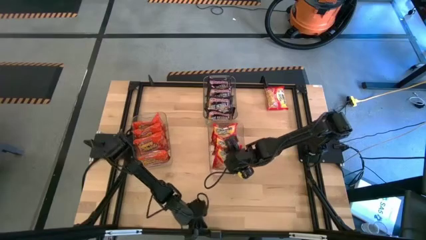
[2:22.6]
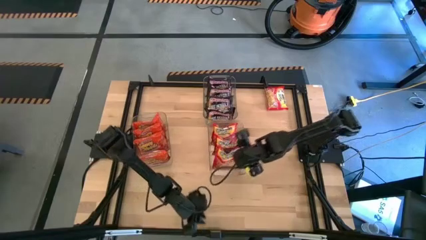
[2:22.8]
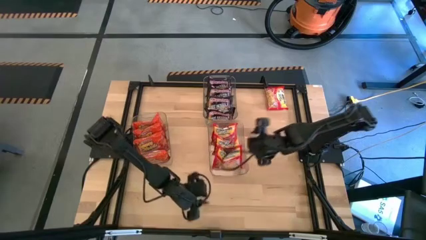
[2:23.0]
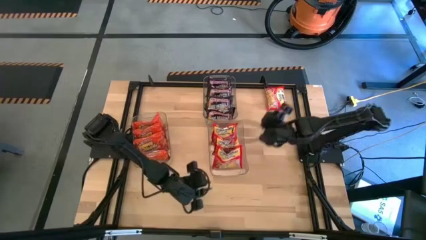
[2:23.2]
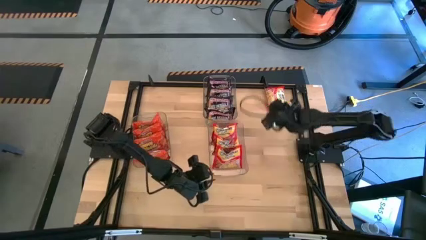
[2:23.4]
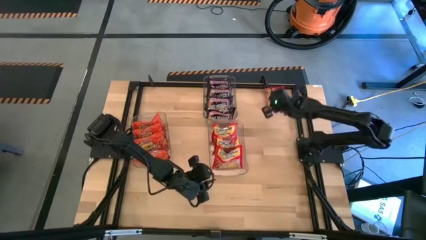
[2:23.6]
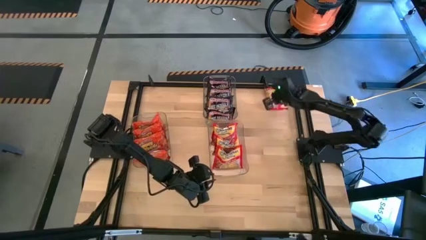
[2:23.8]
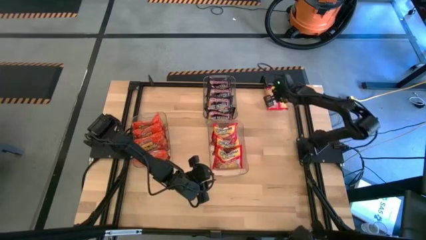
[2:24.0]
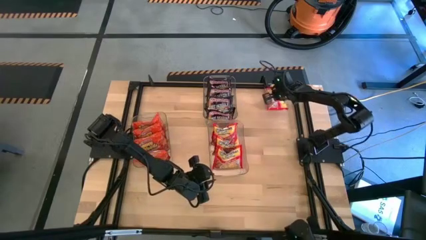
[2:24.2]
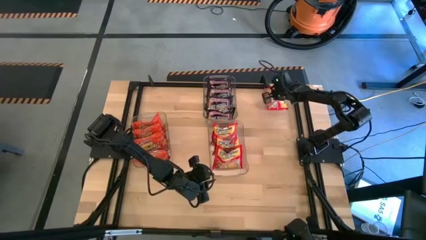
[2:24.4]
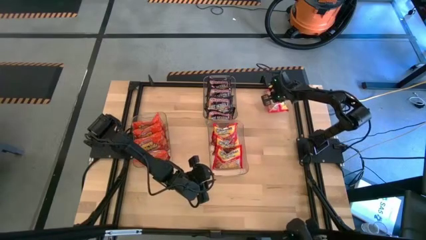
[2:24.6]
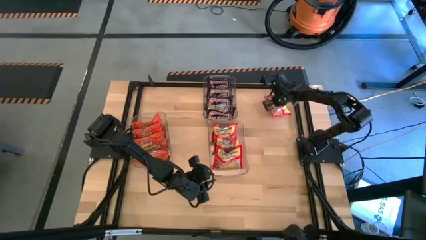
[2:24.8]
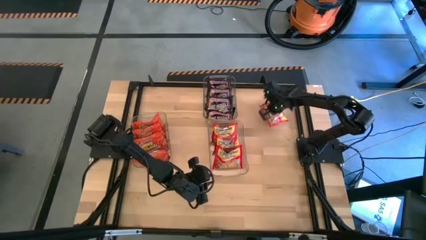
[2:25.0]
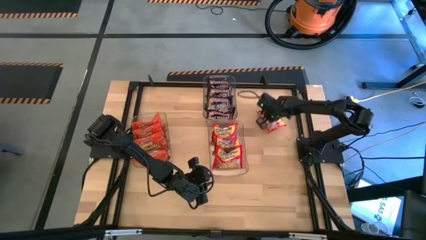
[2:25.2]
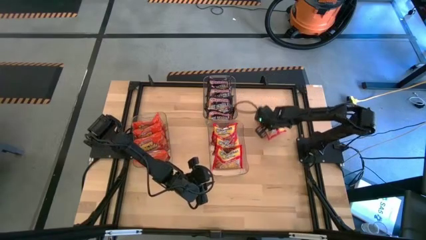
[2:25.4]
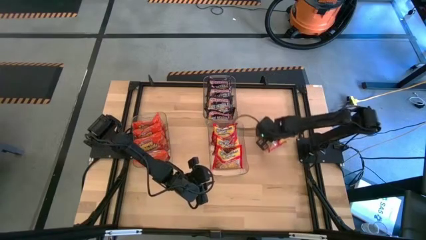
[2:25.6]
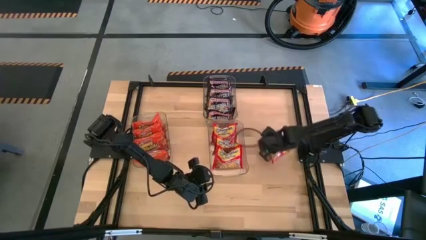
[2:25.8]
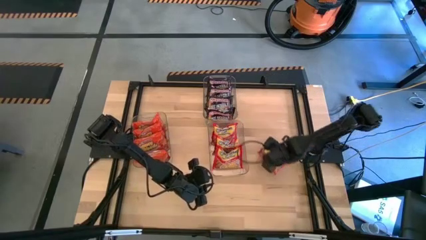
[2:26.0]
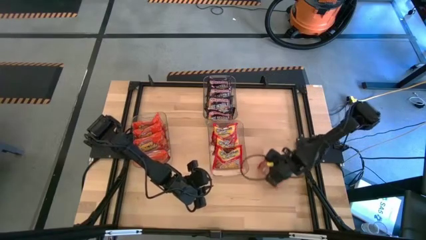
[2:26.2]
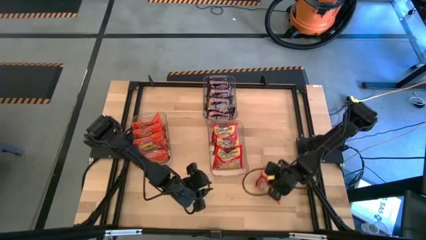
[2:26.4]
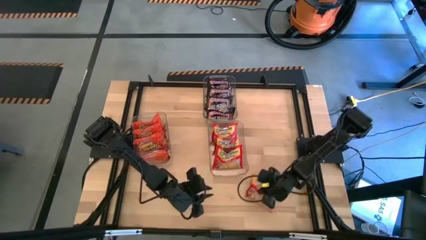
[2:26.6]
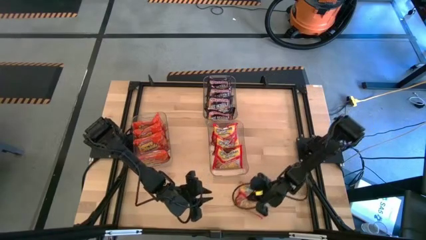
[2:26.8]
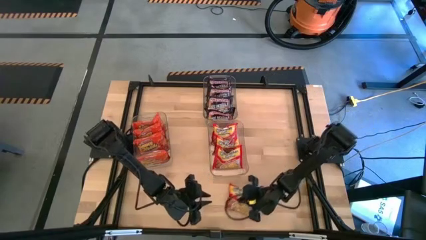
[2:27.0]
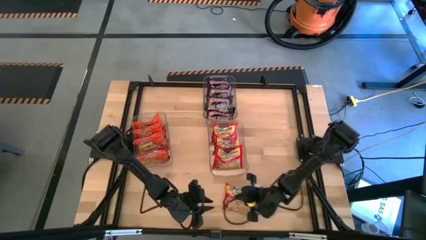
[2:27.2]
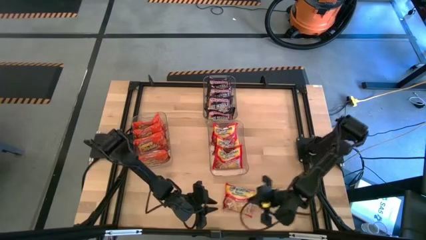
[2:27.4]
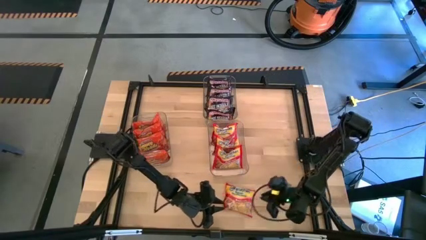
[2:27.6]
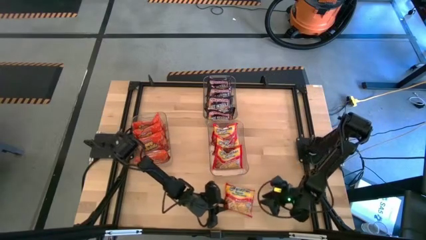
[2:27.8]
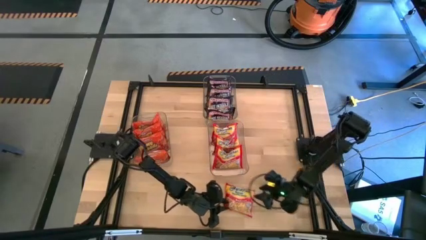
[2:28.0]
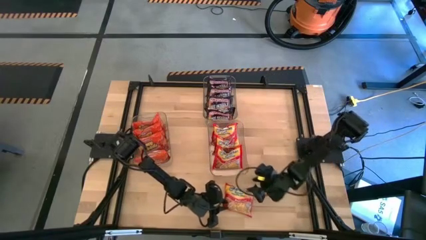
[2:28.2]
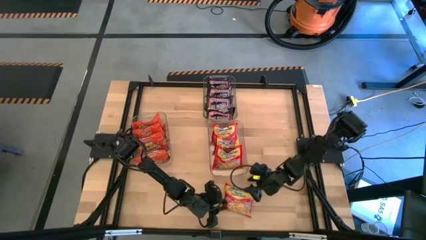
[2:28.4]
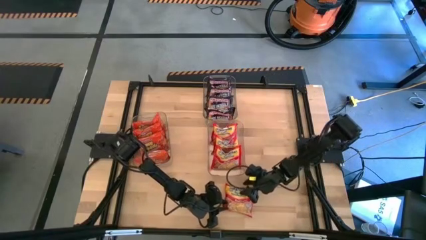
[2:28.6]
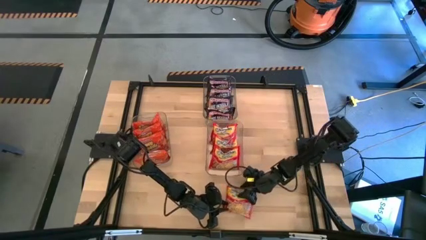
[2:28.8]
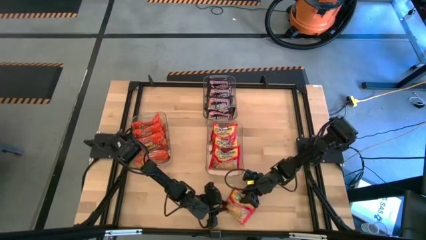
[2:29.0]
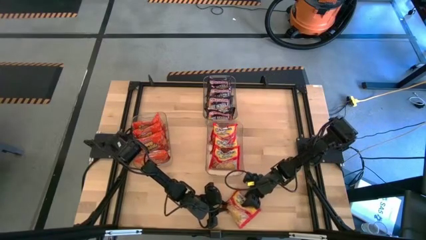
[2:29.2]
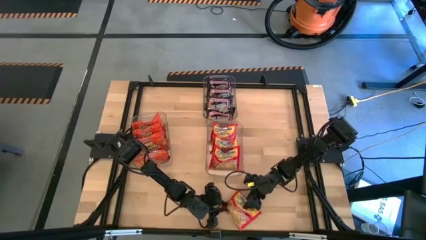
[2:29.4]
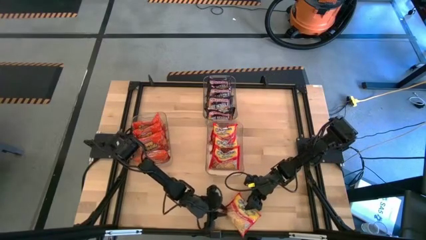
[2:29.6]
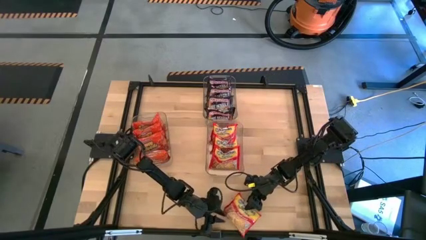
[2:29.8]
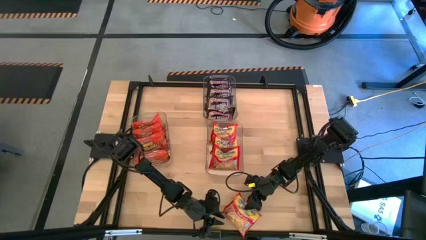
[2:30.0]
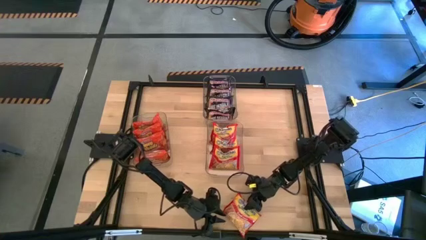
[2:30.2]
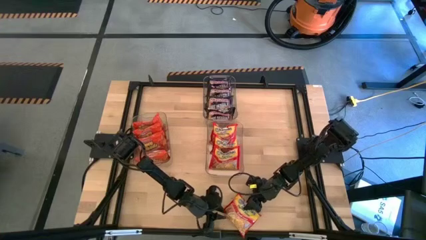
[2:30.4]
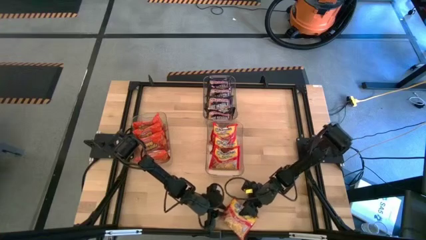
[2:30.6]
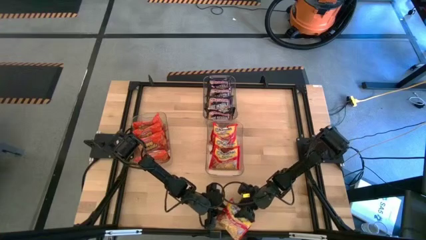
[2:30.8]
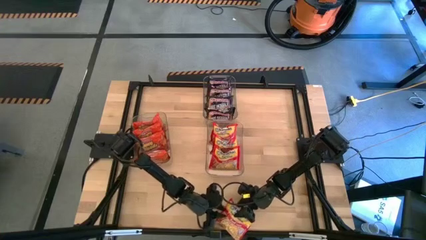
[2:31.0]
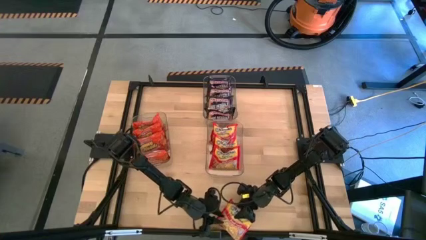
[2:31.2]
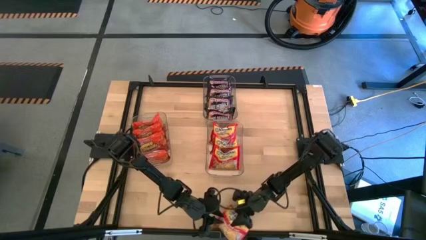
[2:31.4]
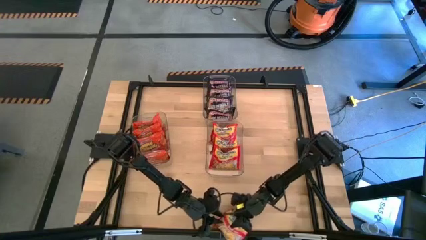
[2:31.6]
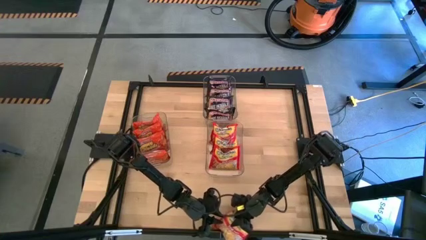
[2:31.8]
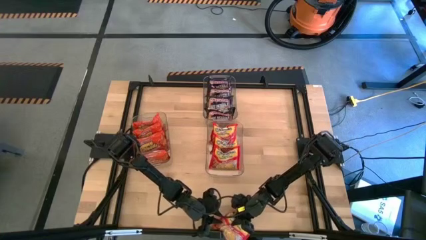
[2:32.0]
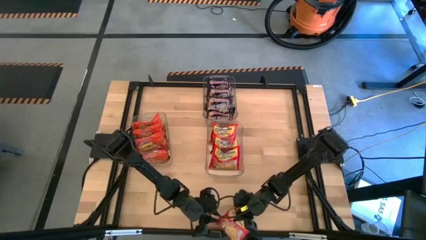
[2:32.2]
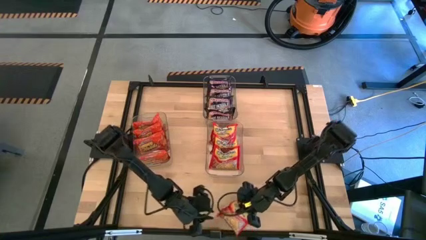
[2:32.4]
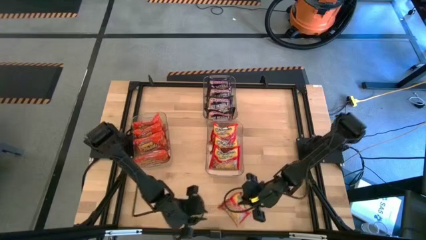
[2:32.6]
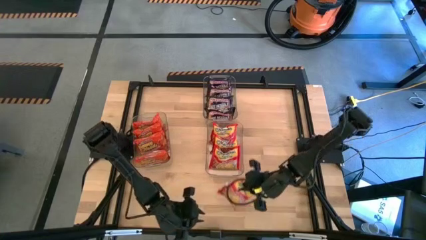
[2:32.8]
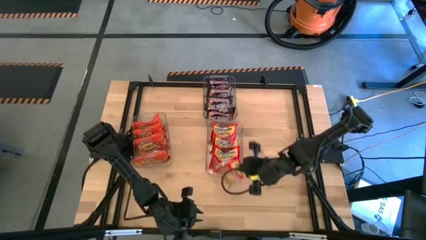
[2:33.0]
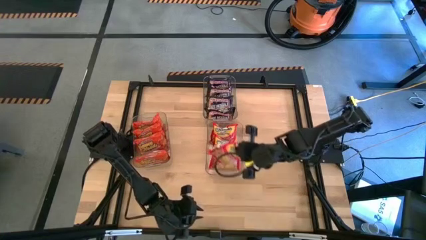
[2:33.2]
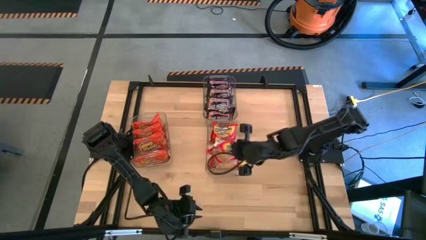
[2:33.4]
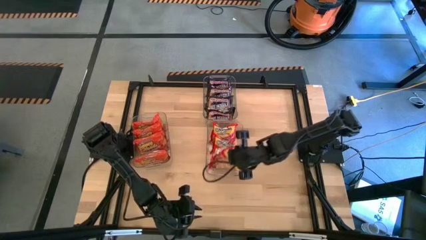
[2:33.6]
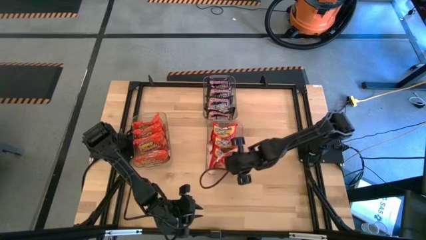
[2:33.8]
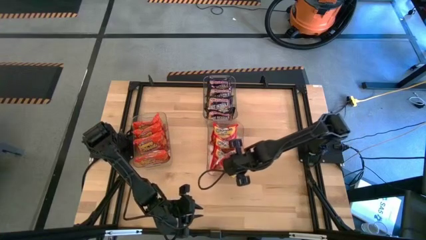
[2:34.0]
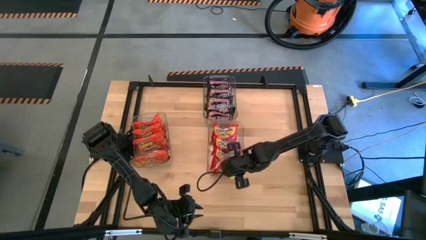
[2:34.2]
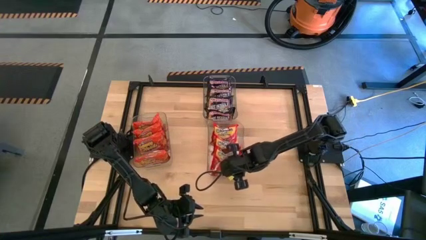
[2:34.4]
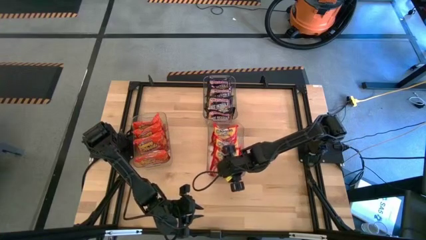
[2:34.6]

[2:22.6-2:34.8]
Task: Sort Maruchan noodles
Put the red noodle pack into the right transparent bin

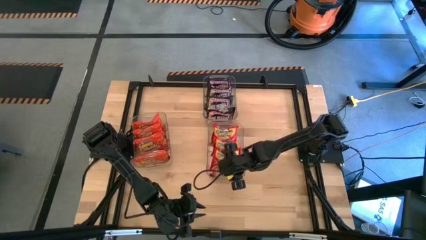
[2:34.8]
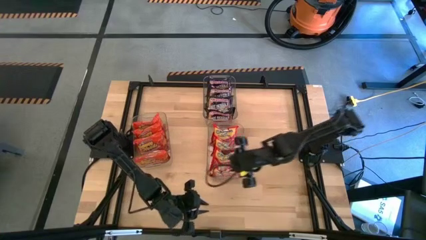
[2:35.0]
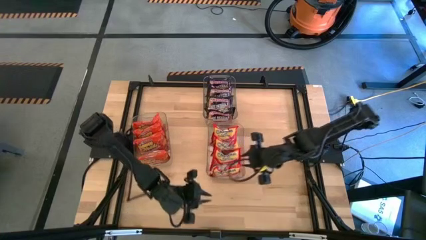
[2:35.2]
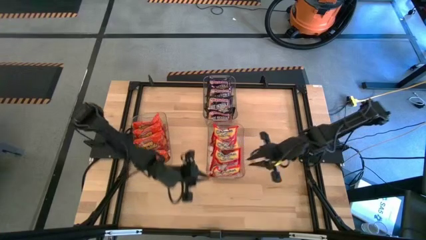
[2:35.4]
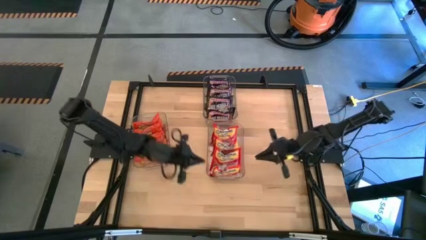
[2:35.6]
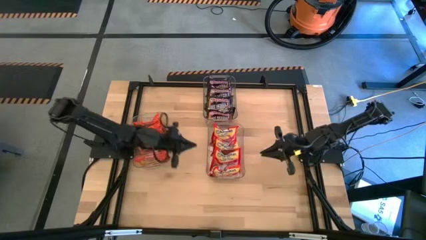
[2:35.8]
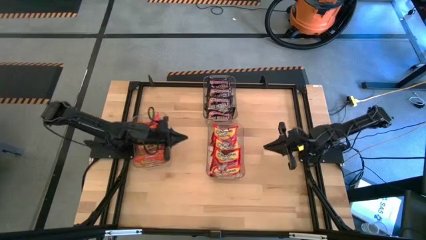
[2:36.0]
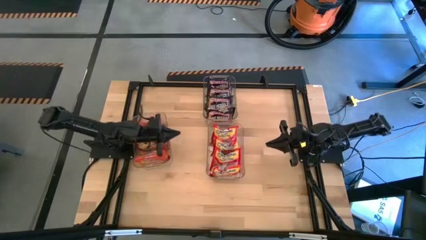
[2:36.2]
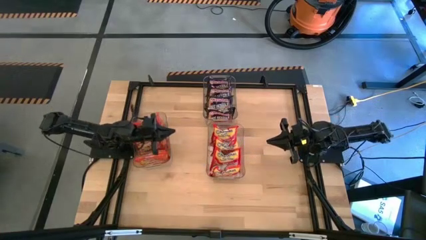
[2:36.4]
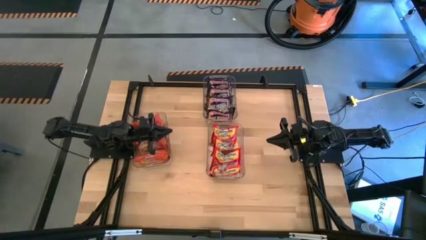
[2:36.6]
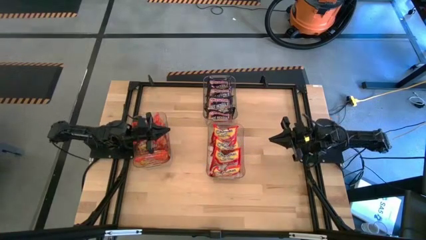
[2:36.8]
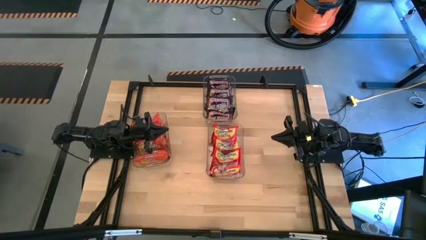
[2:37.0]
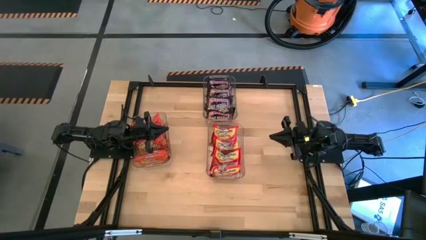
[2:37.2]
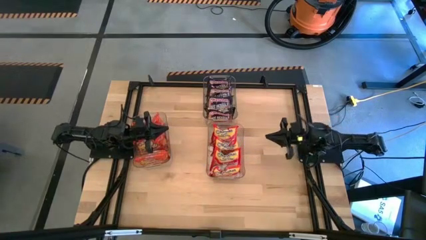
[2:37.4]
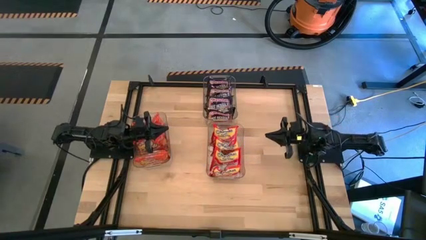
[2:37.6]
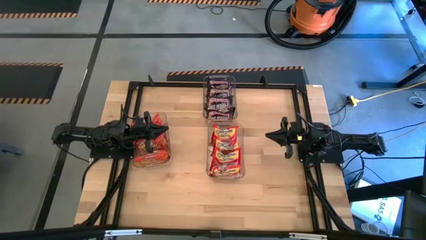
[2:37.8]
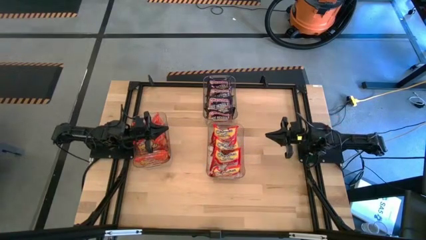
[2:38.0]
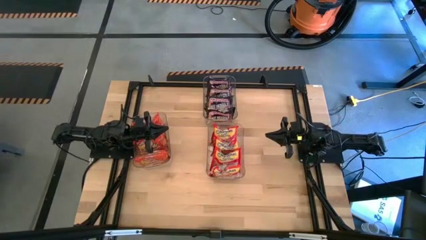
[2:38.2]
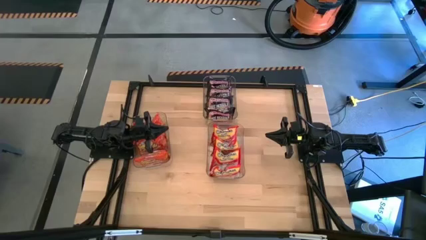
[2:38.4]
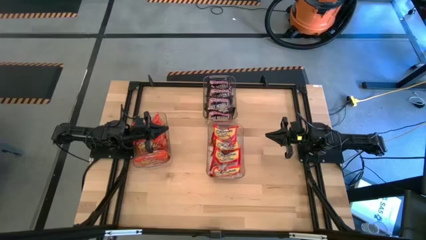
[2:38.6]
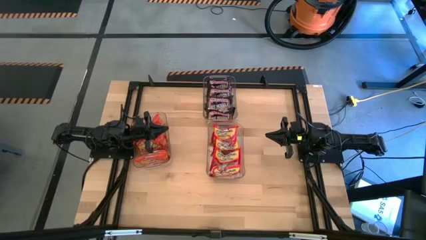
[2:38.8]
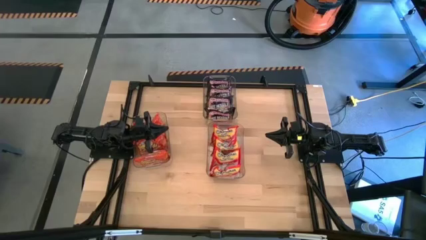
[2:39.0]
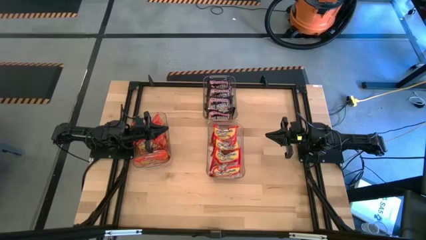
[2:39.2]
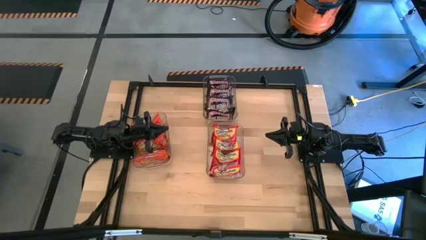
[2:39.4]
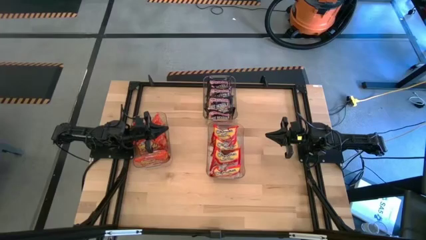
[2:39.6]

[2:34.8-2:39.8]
Return to Home Position
